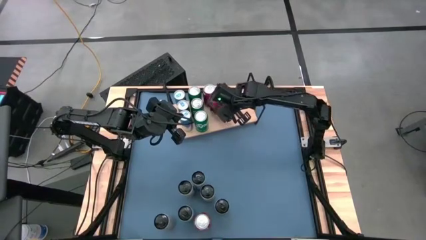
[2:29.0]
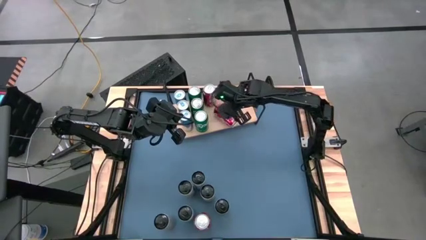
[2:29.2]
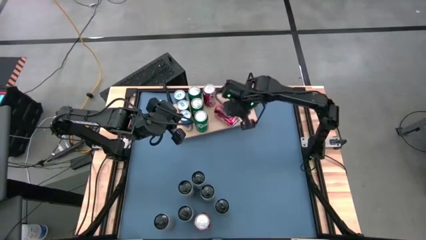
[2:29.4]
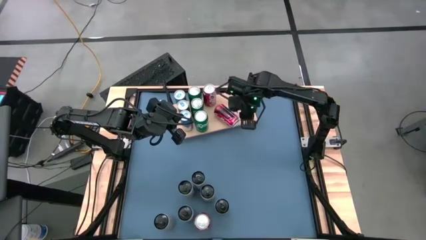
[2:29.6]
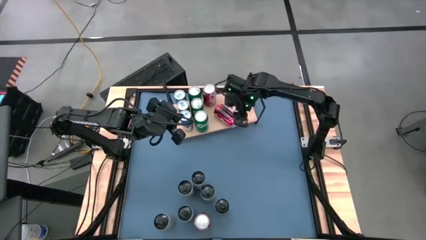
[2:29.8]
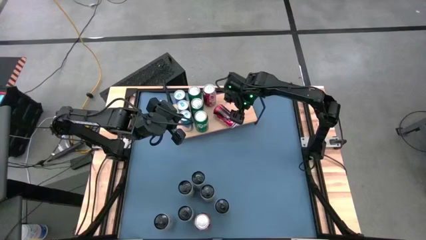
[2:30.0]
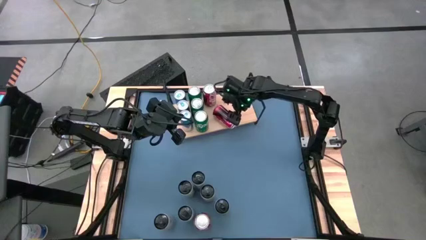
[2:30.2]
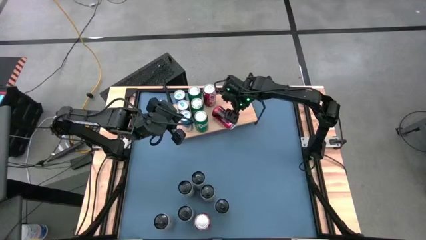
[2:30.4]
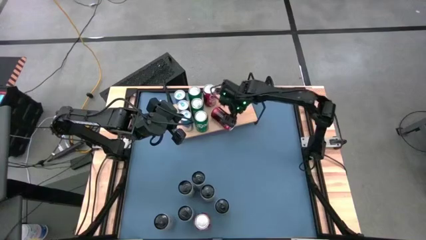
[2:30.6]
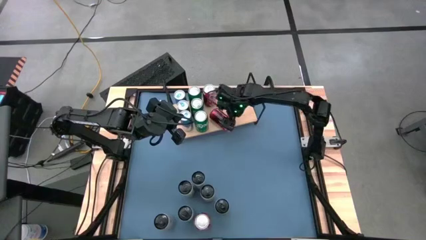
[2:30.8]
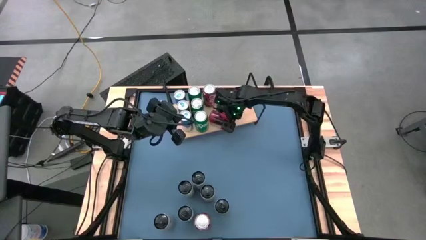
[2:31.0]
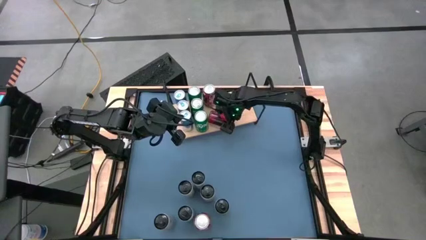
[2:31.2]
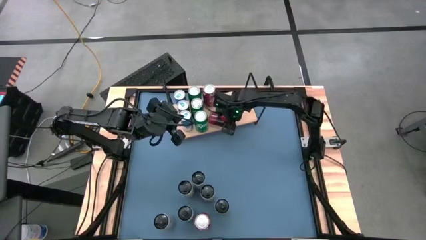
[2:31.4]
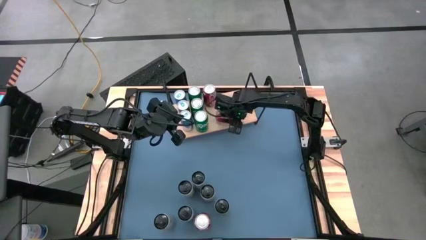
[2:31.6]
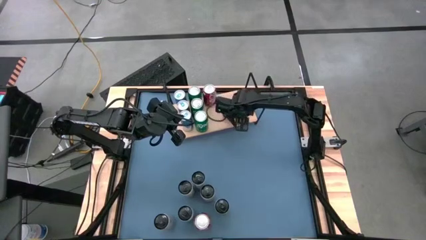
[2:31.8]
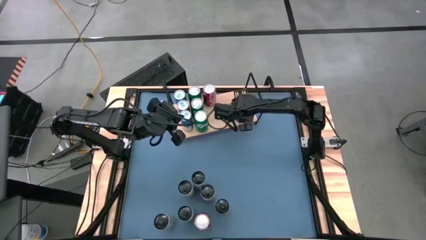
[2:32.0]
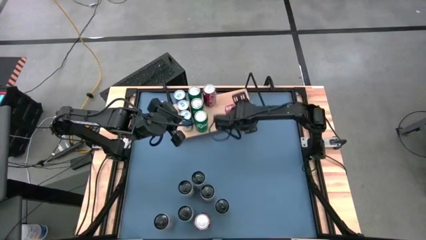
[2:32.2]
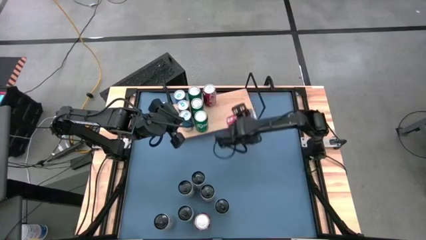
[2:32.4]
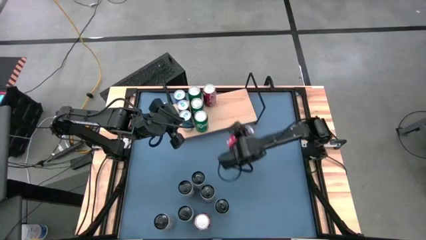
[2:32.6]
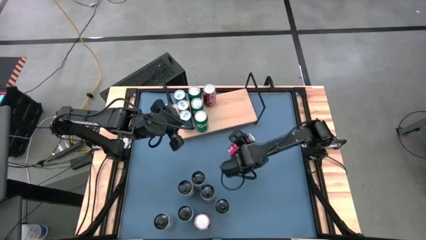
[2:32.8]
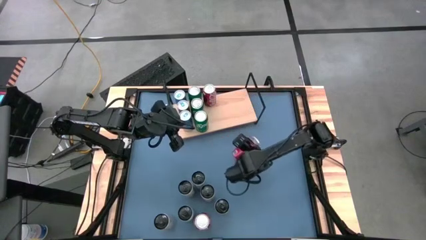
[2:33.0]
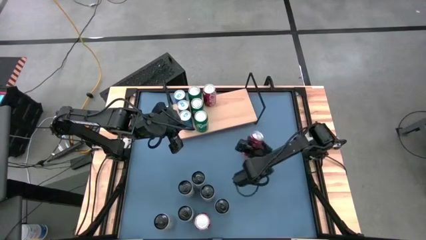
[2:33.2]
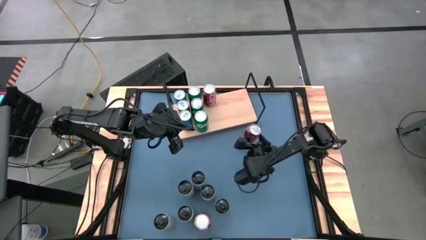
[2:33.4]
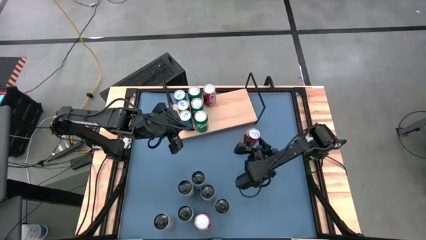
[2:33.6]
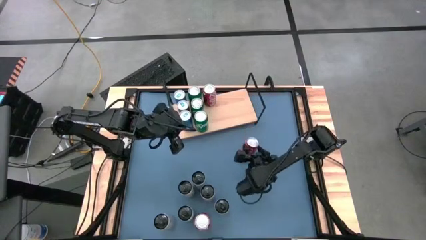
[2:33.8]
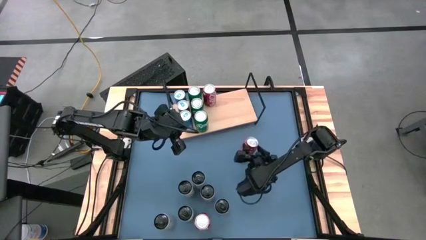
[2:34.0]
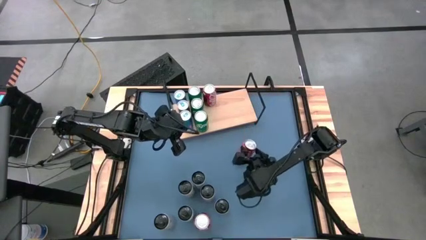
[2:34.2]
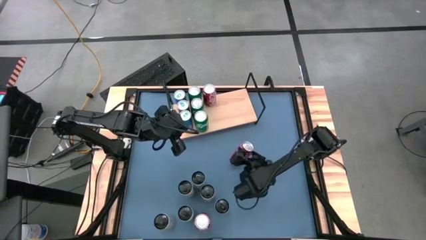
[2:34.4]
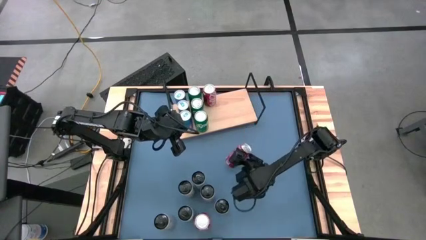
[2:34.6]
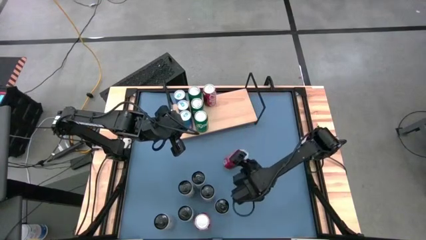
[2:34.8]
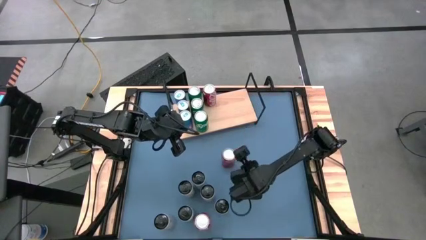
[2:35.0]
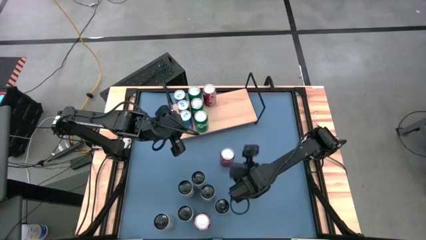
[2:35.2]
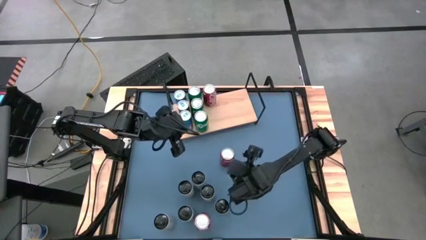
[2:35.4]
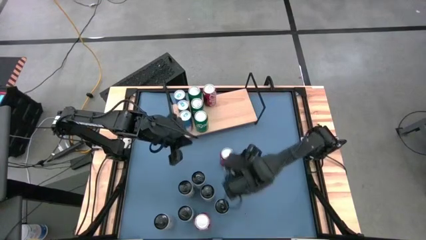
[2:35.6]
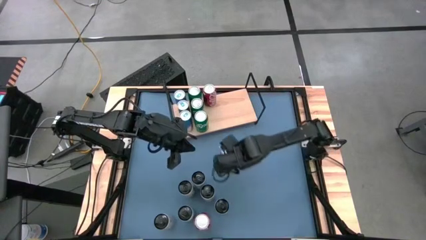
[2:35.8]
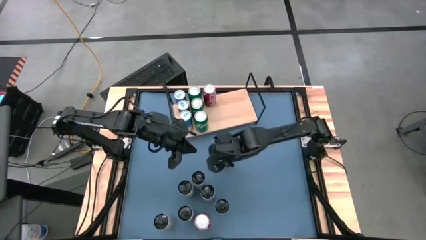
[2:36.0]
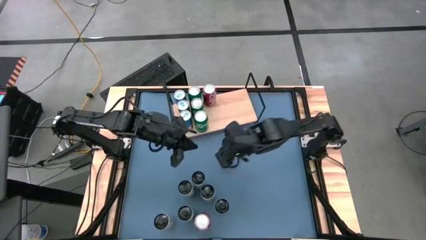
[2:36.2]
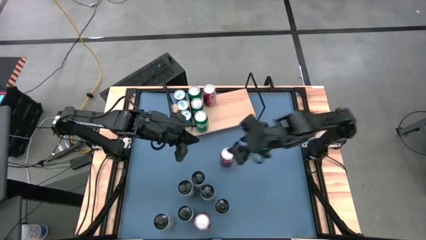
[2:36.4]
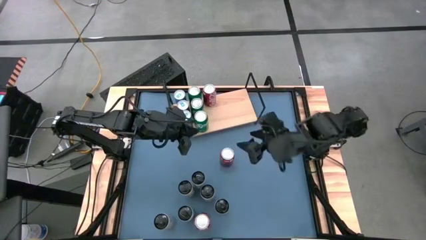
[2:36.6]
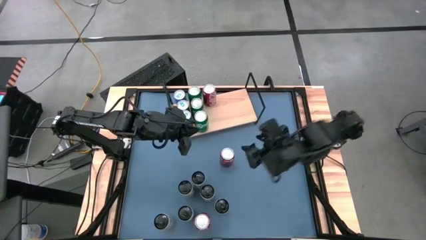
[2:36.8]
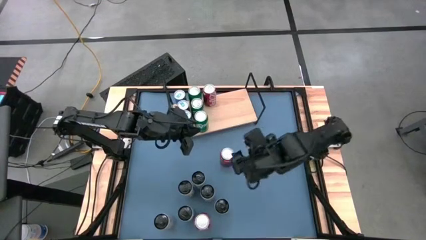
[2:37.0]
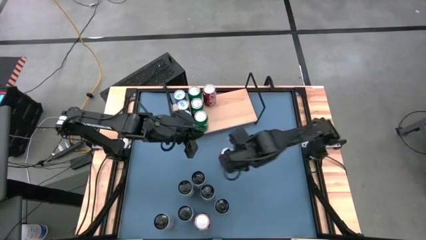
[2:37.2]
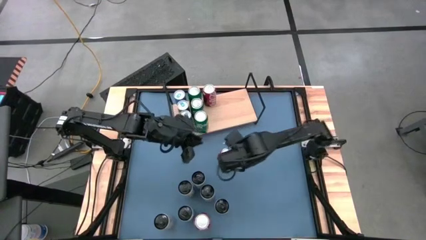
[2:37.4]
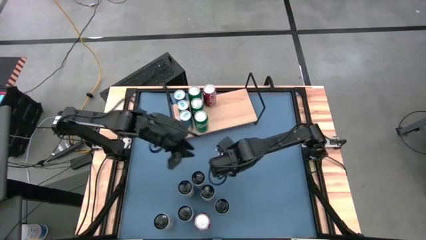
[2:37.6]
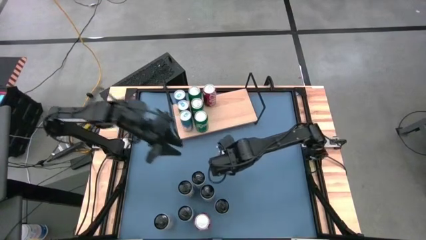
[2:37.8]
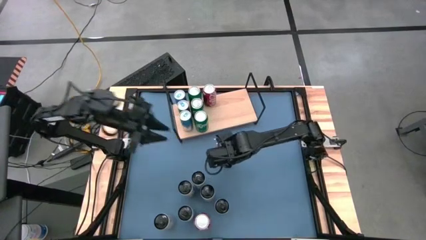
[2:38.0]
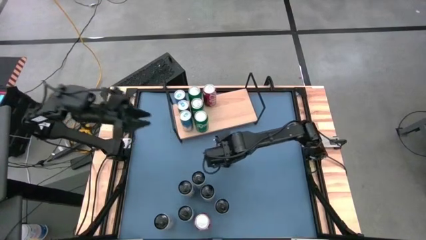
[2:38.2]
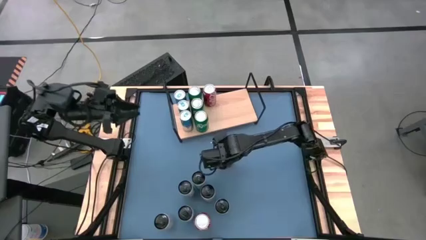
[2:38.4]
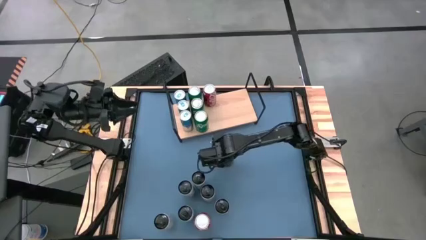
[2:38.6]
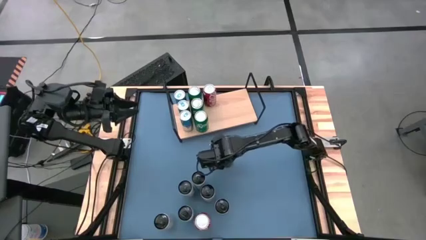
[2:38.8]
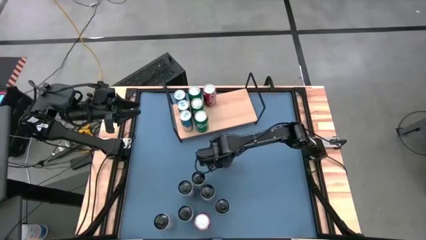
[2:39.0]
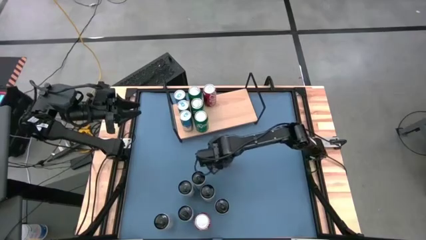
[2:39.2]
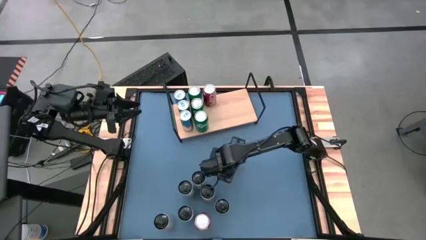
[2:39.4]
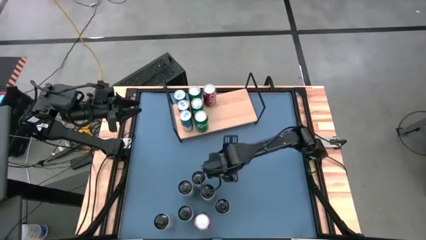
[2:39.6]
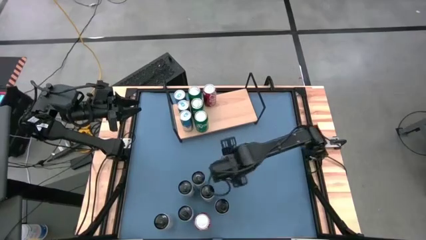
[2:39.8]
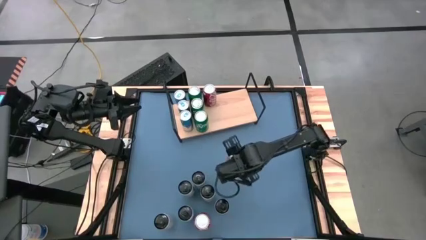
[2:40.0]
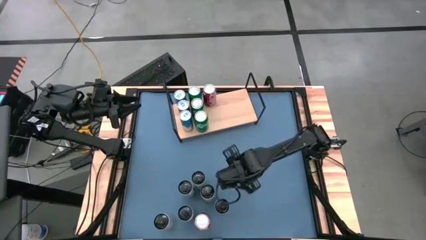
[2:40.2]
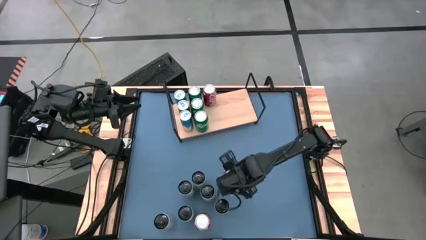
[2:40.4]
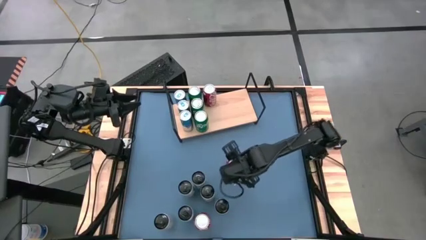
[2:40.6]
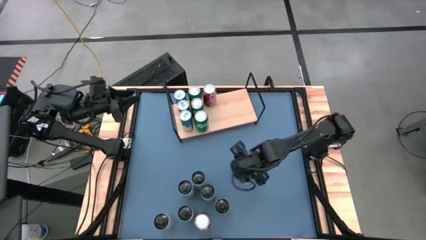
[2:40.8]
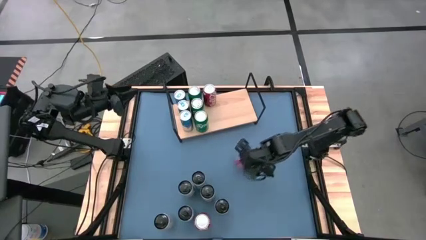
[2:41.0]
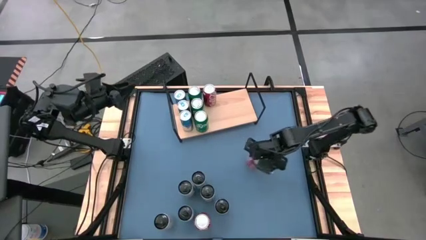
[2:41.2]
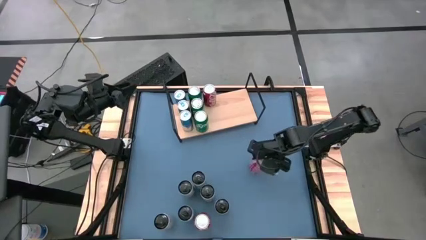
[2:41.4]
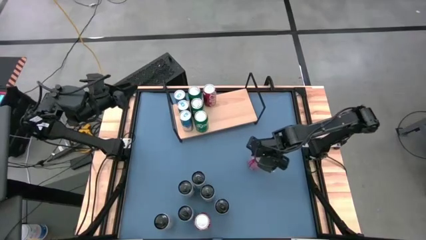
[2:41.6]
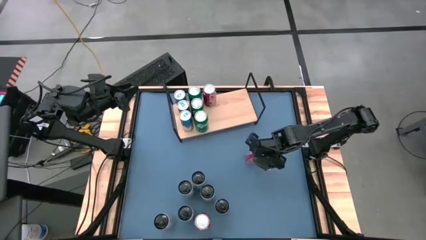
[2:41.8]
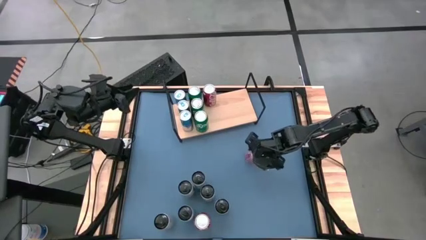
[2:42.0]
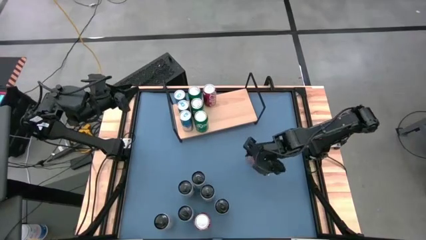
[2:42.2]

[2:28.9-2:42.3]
Task: Place canned beverage on shelf
Put the top red soda can on the shelf aligned with the other red soda can
